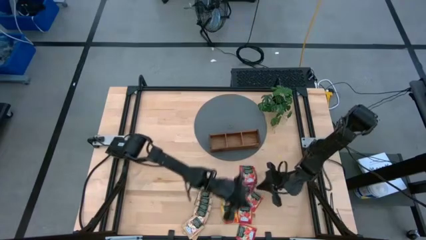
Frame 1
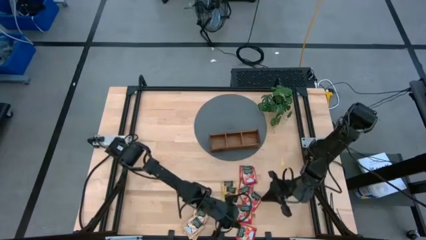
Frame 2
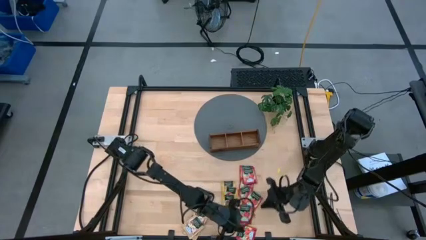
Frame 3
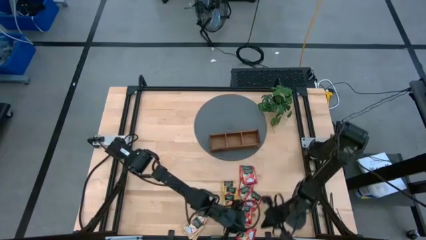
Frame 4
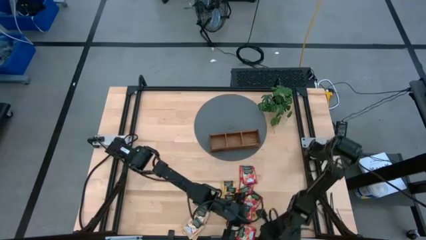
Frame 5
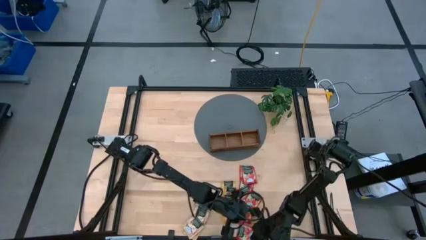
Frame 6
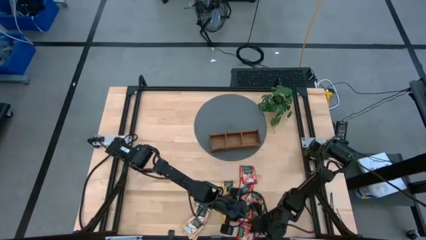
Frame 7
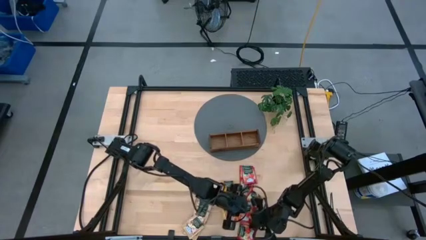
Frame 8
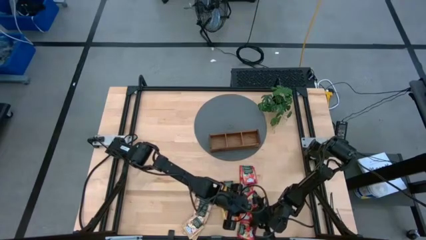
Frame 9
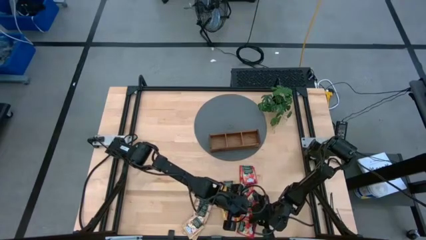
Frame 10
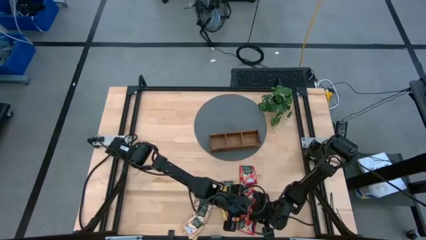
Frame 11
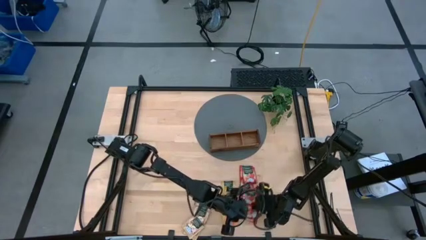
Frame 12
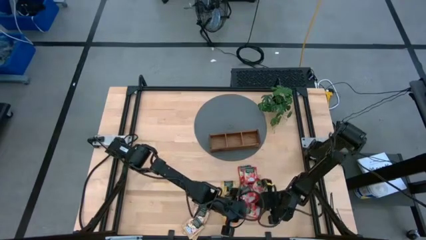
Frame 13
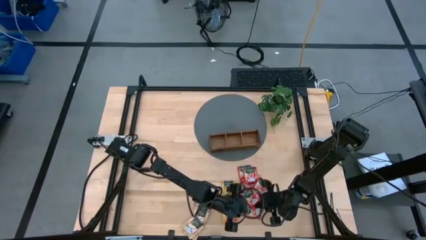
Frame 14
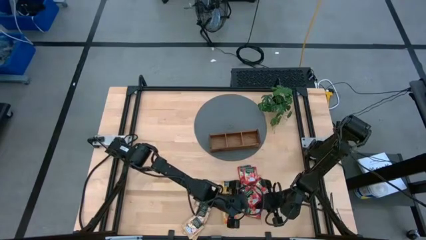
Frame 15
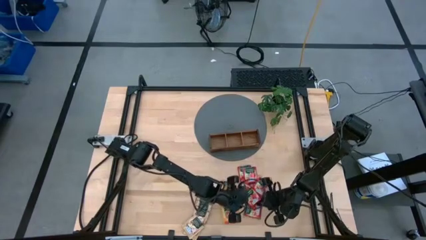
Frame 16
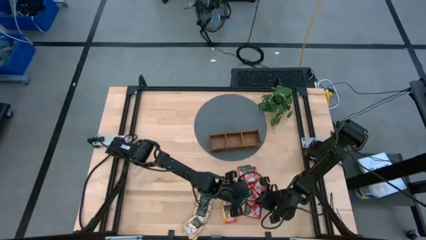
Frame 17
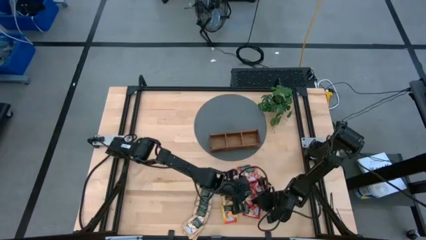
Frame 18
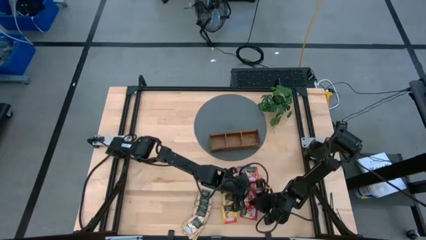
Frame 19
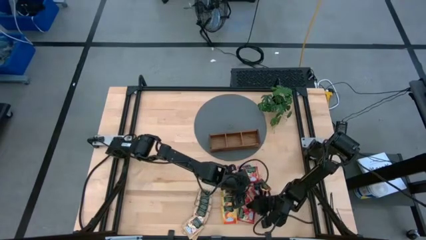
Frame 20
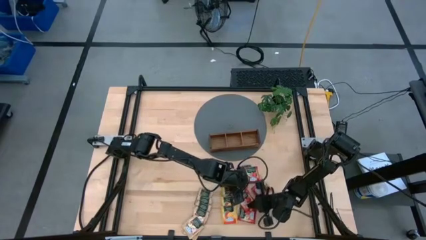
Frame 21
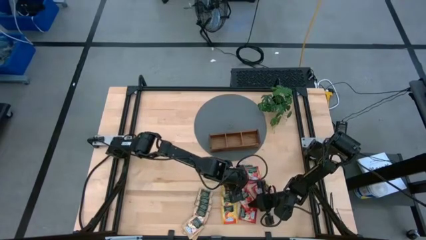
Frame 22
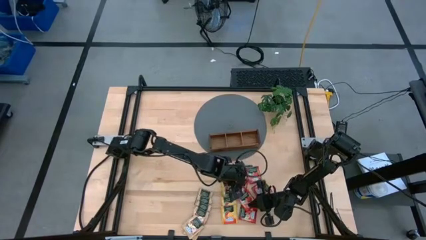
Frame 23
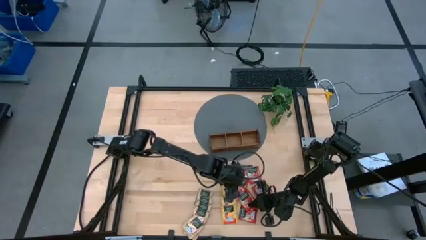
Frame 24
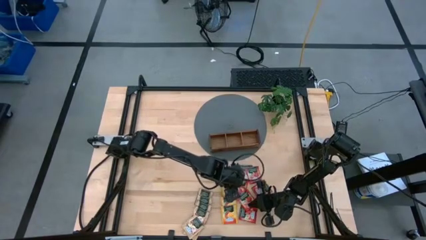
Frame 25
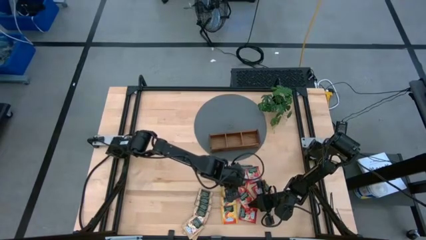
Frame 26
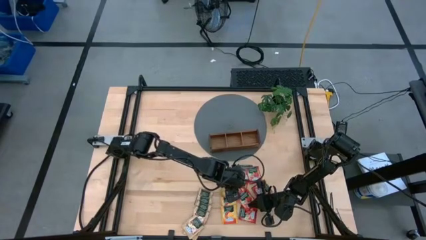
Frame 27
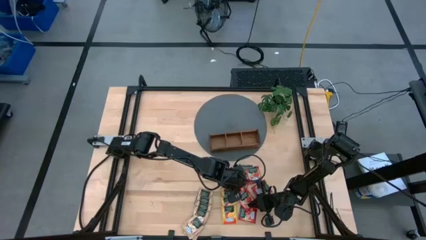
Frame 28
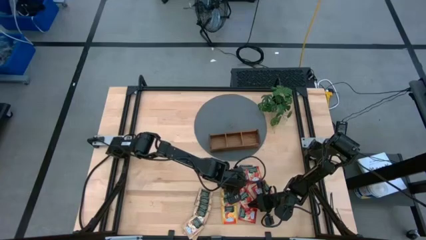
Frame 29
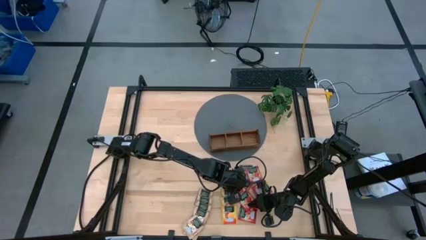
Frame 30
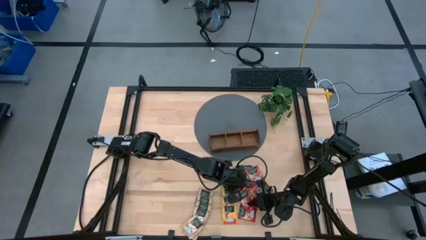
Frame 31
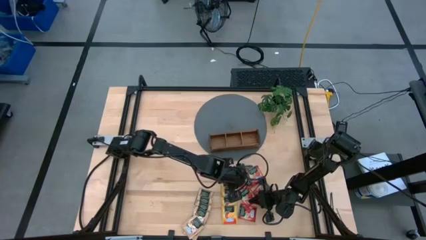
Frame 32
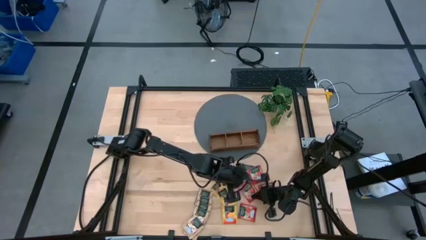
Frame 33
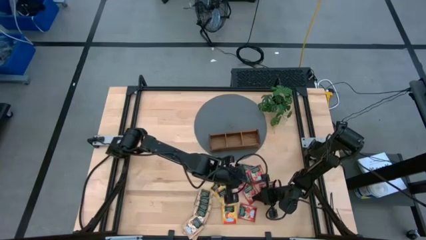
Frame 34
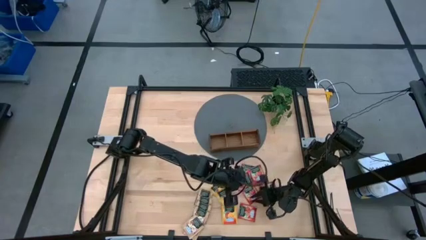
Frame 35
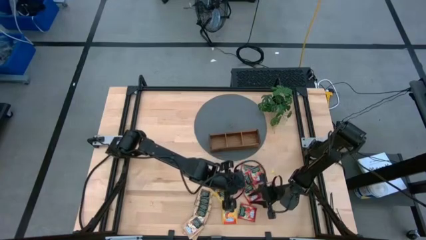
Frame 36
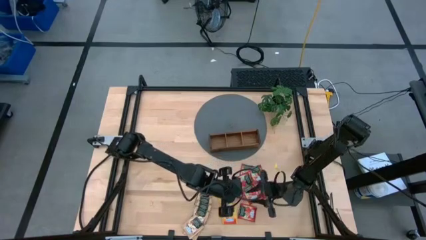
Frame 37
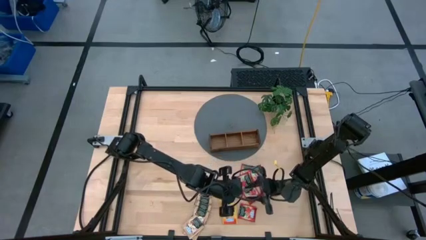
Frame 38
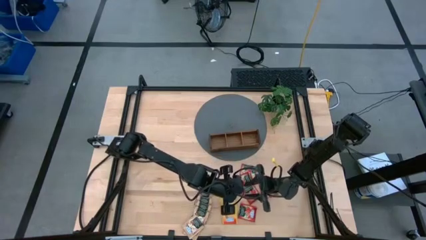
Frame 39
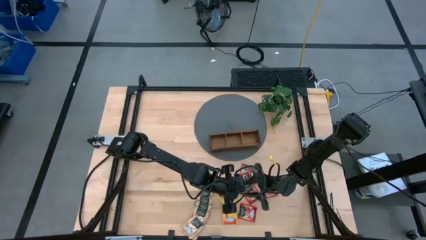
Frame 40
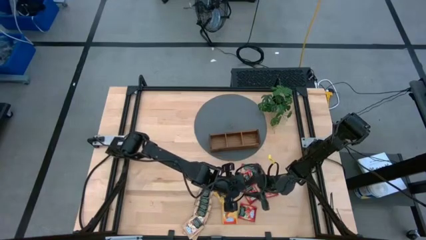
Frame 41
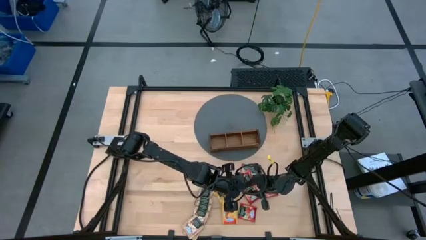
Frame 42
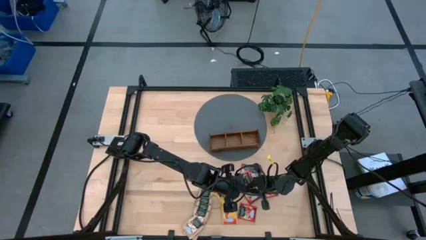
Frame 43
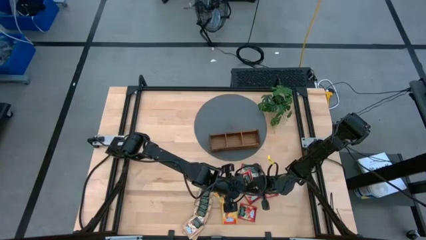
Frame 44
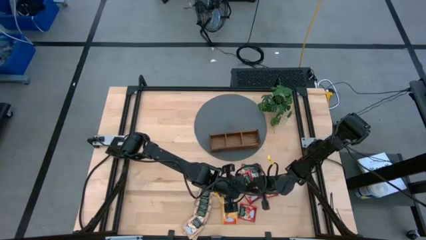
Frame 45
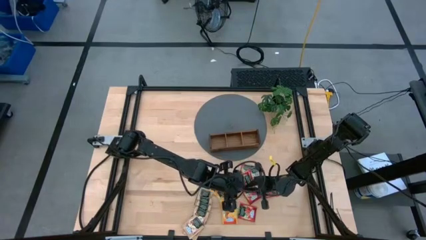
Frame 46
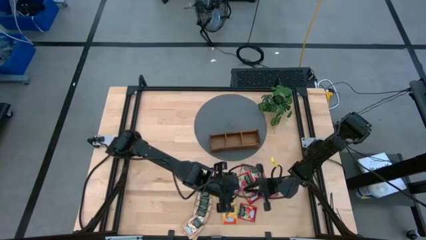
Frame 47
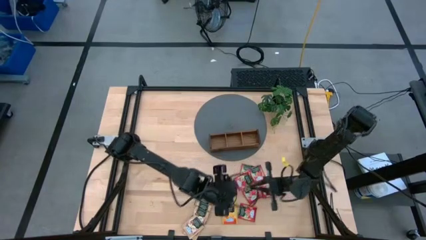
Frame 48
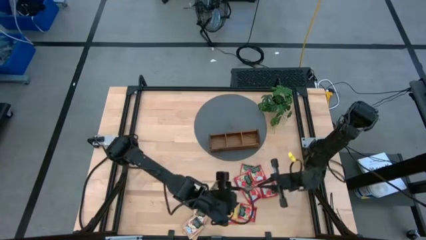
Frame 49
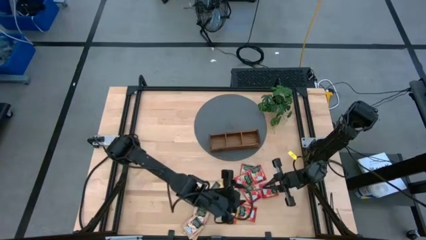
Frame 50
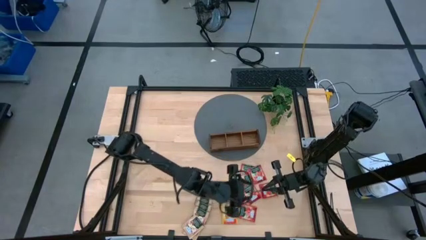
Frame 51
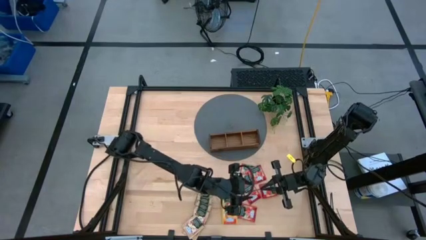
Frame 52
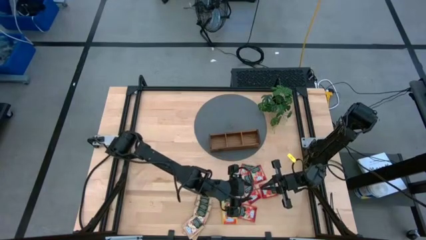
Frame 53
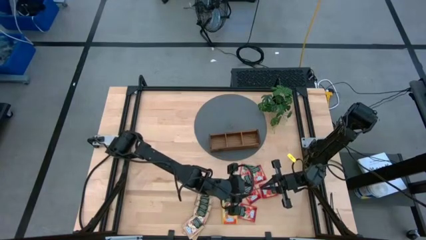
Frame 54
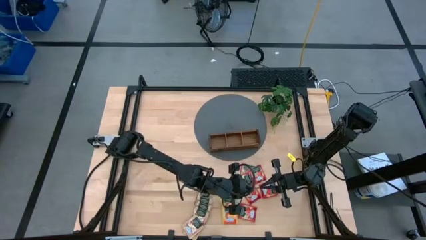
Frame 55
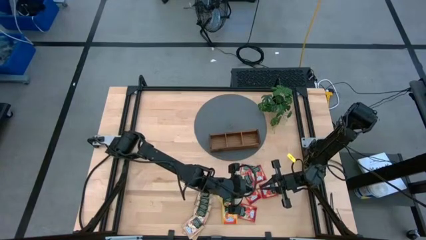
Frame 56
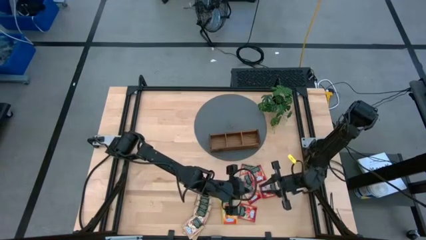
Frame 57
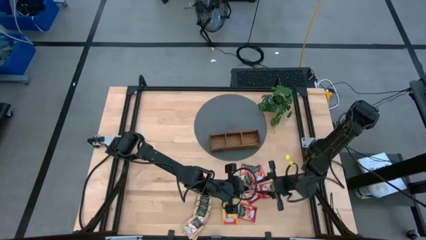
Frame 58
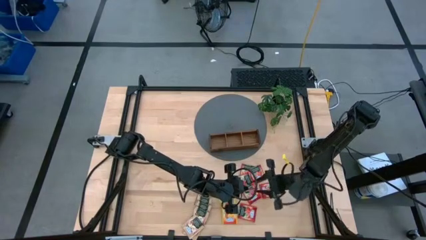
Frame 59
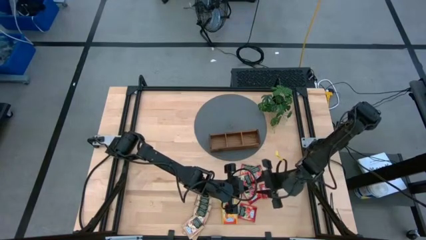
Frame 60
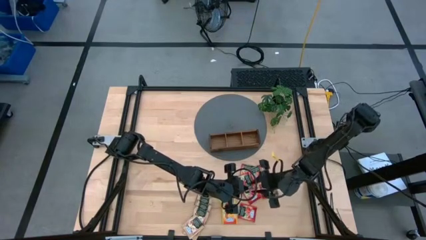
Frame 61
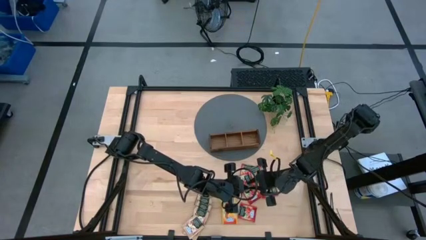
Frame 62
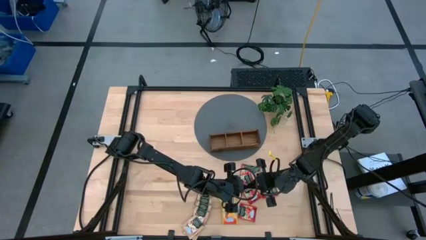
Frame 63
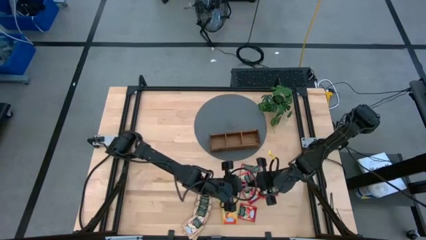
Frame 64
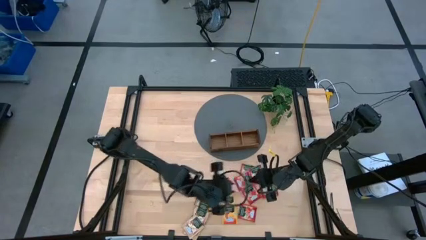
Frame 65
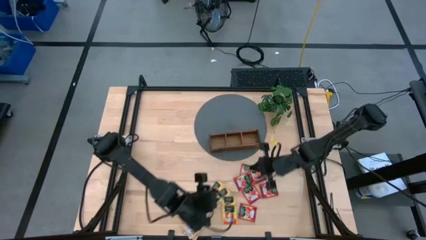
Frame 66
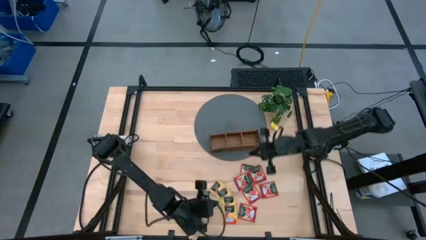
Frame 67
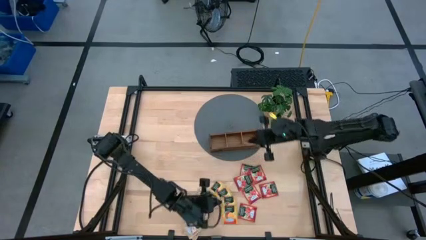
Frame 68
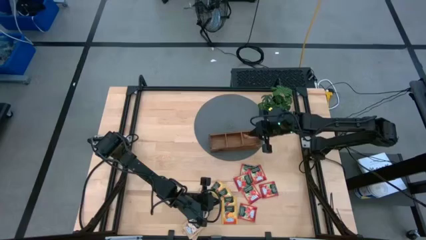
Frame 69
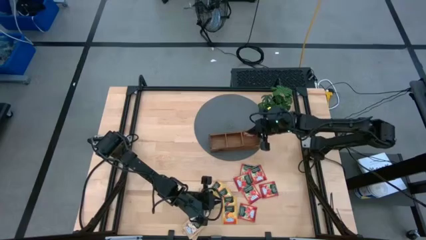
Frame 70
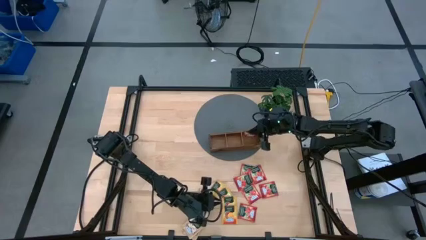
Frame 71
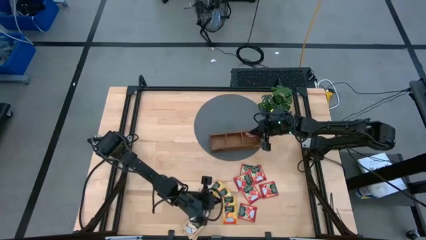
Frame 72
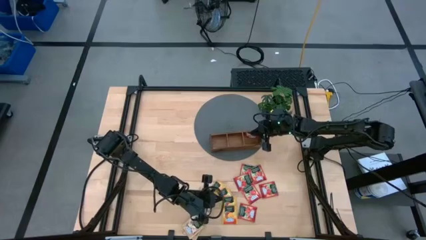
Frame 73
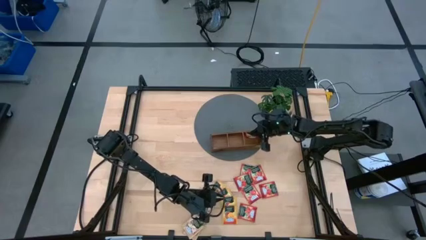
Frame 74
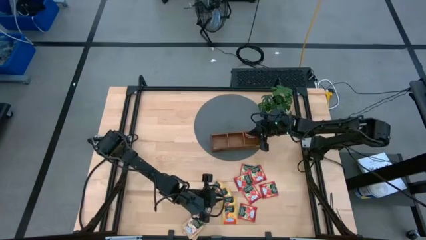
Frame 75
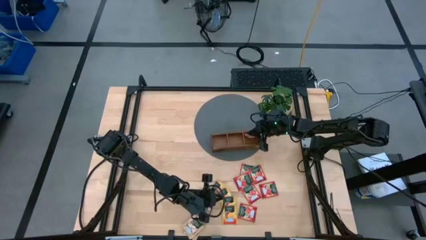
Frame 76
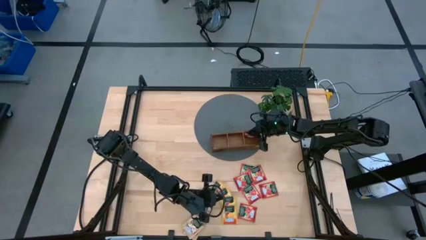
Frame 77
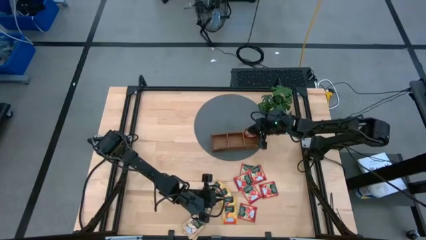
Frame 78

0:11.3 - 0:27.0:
Task: Pick & Place Tea
Put the red tea bag into the right section of the wooden organizer
